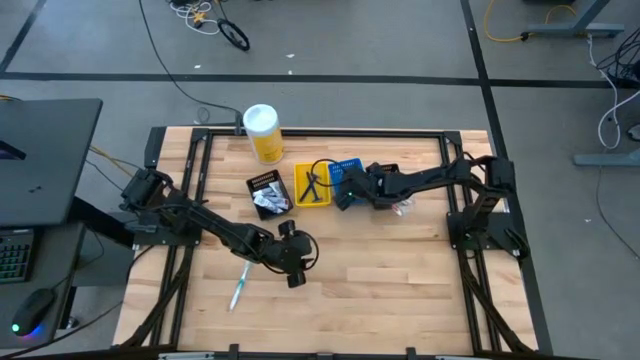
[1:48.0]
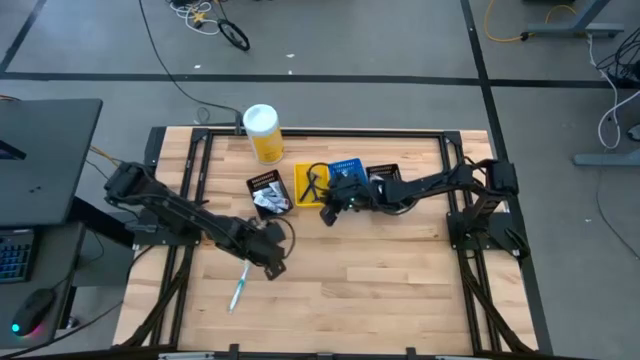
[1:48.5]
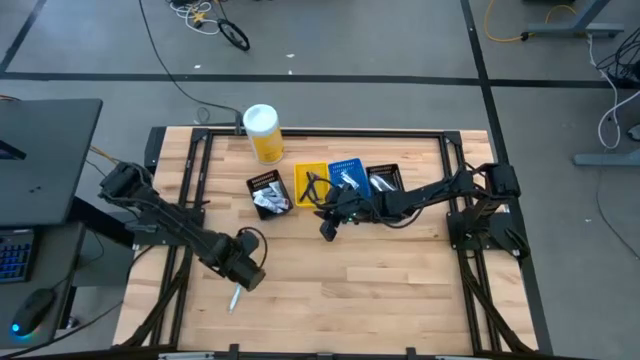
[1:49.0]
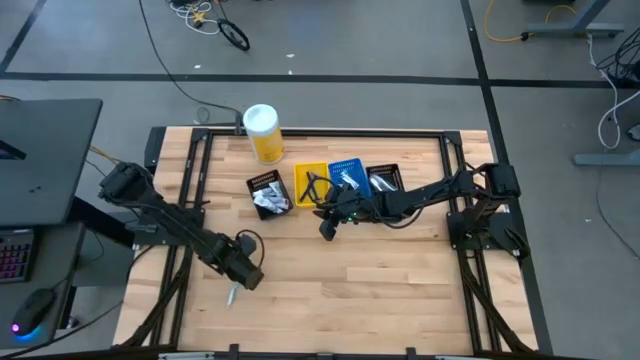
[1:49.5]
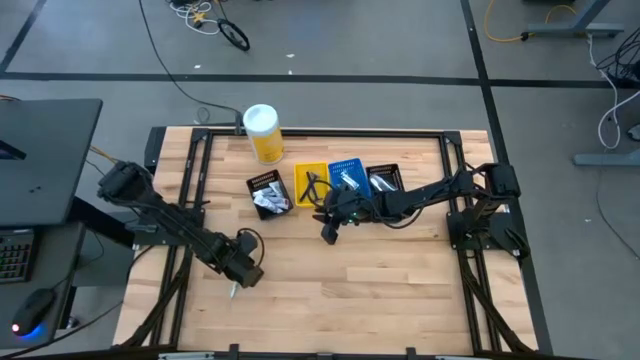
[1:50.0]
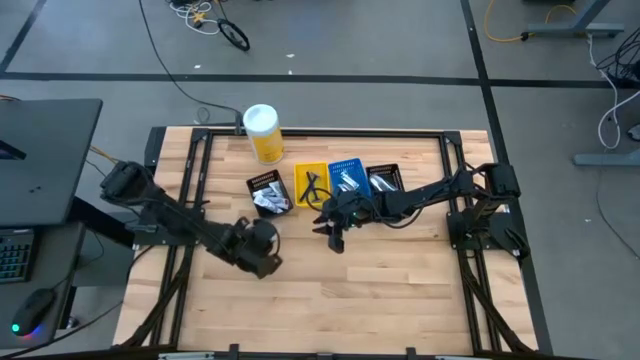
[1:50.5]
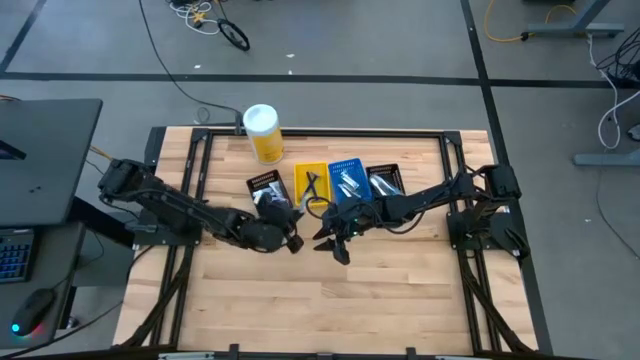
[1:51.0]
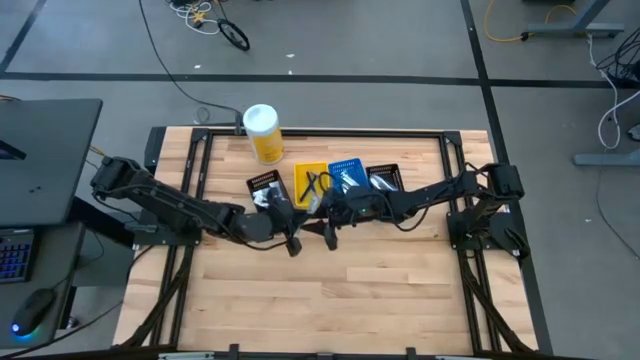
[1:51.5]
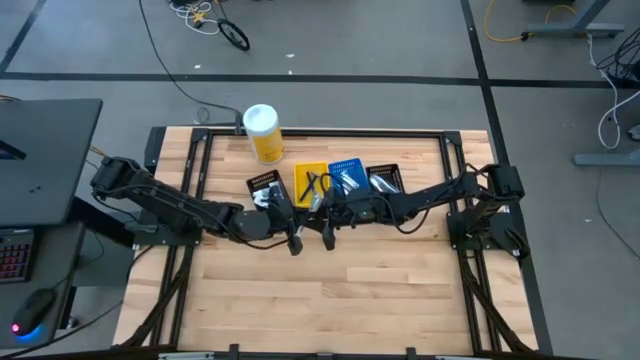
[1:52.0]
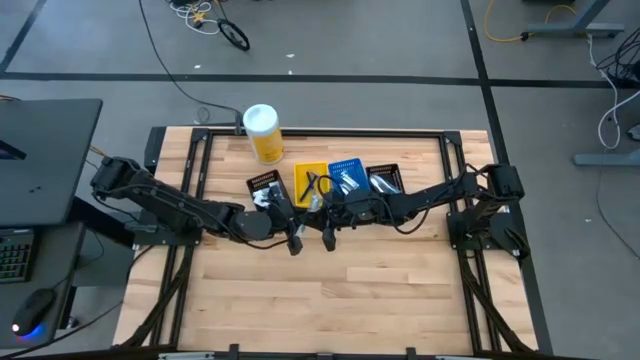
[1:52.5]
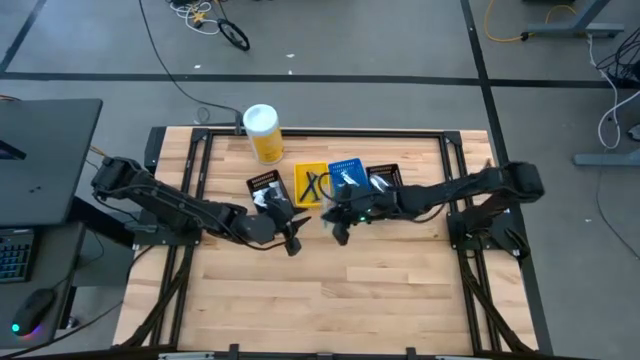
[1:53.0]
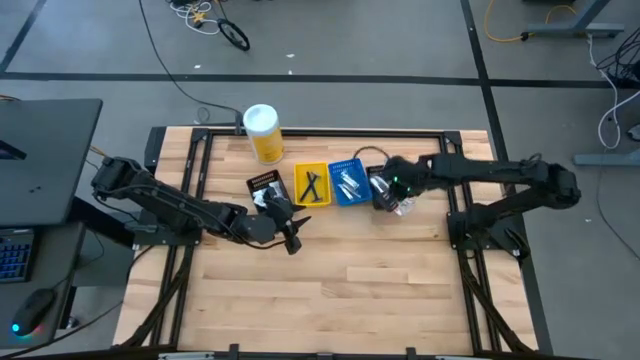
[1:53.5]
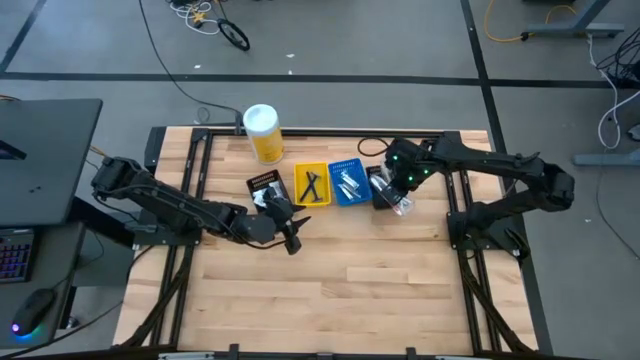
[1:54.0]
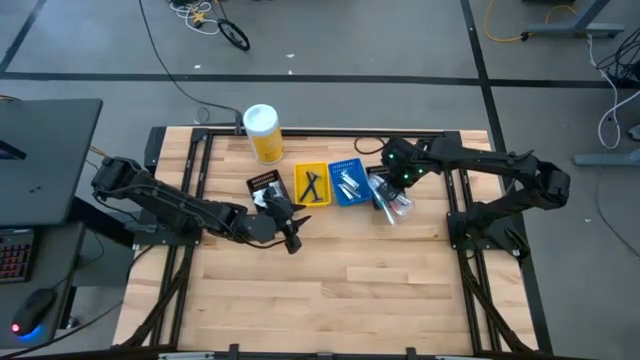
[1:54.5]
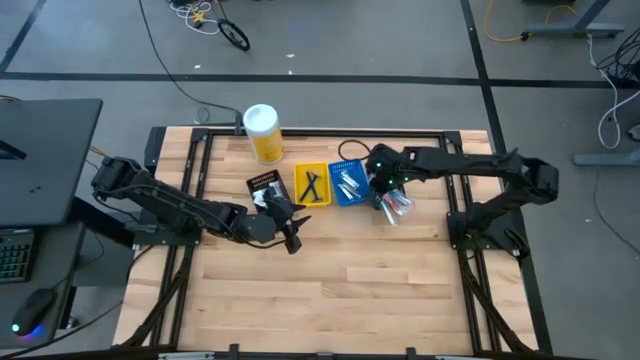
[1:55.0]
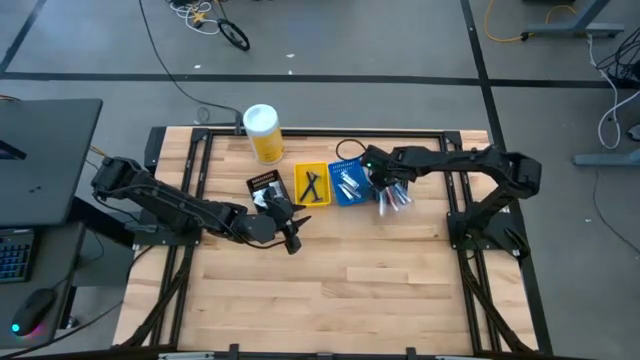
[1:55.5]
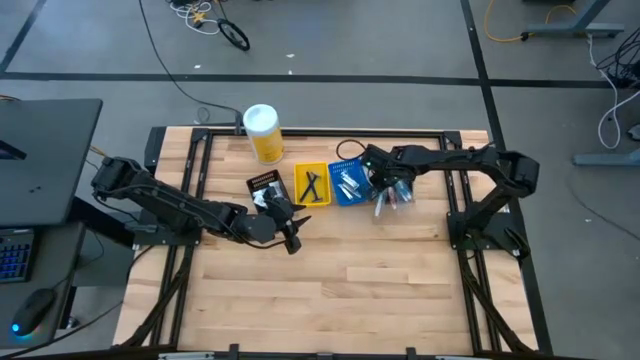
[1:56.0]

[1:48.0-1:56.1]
Task: Pick & Place Travel size toiletries
Put the green toothbrush into the right black basket

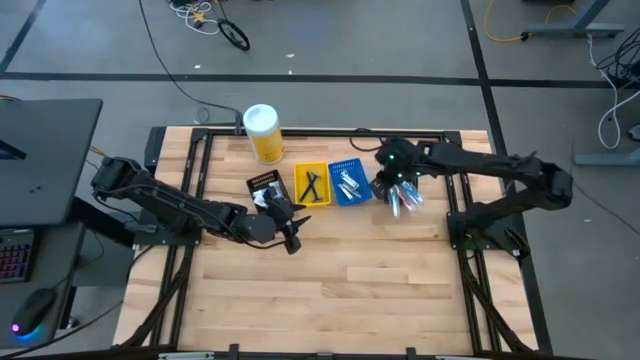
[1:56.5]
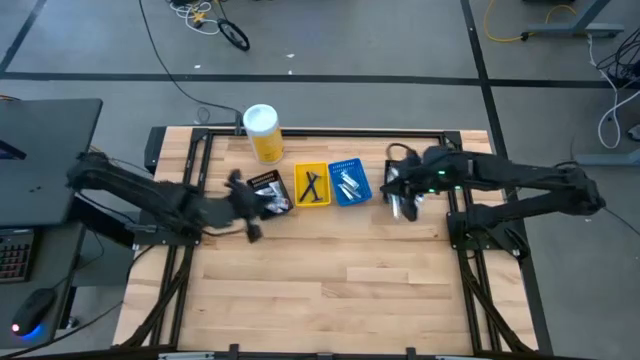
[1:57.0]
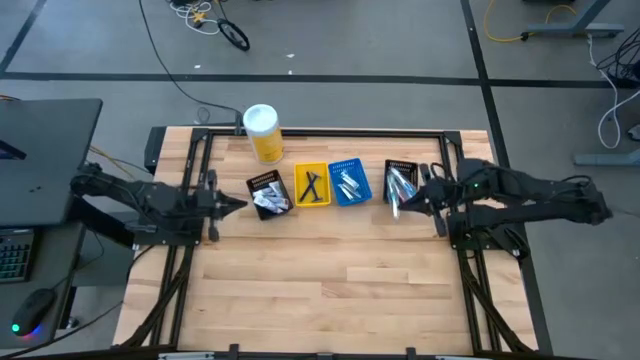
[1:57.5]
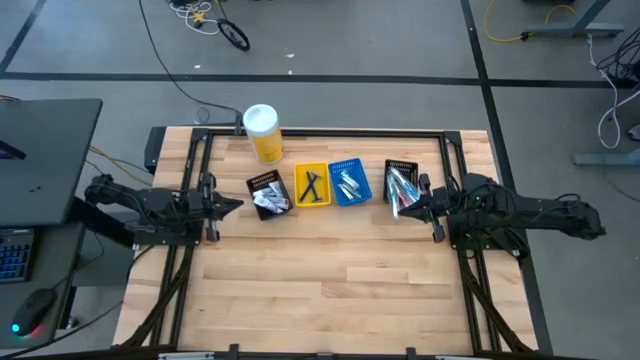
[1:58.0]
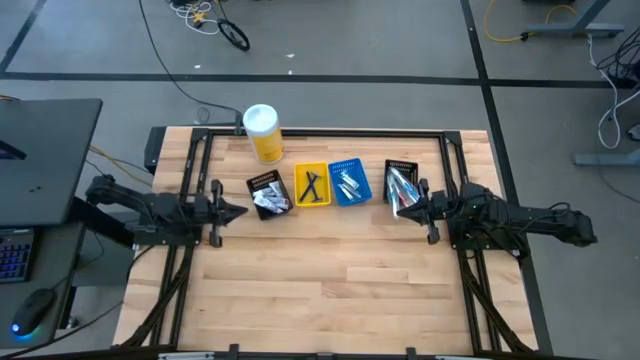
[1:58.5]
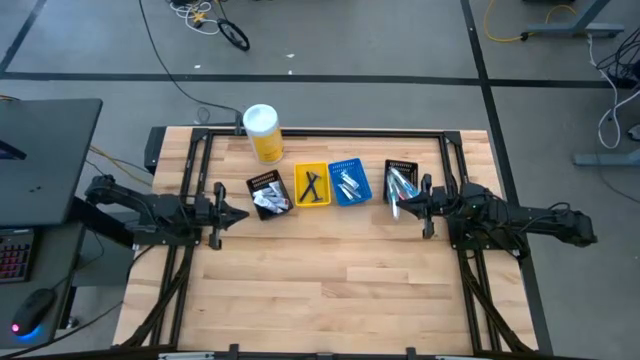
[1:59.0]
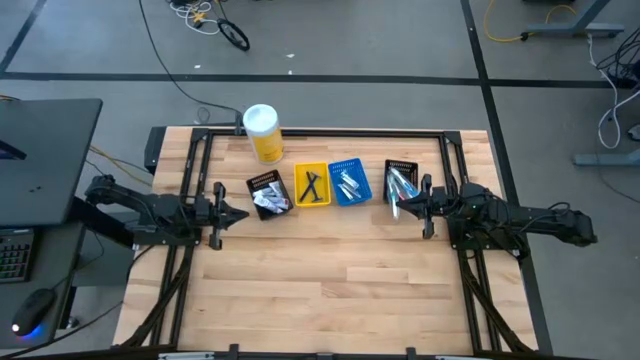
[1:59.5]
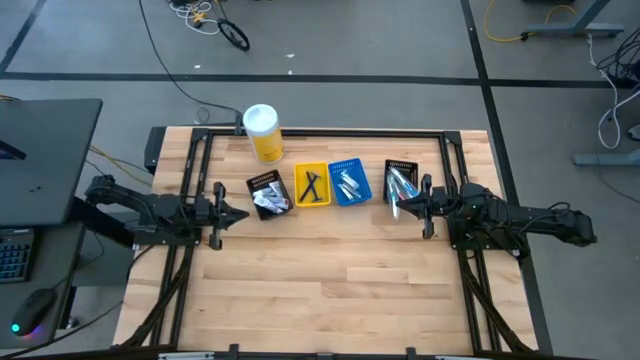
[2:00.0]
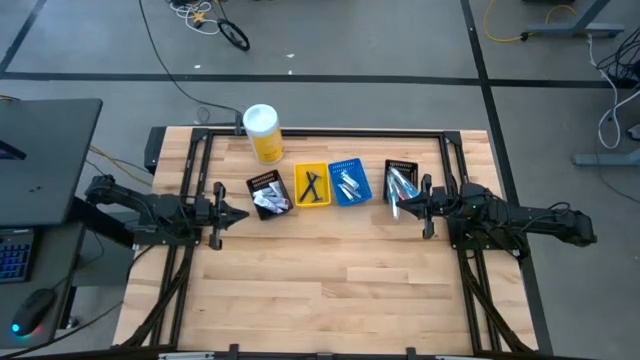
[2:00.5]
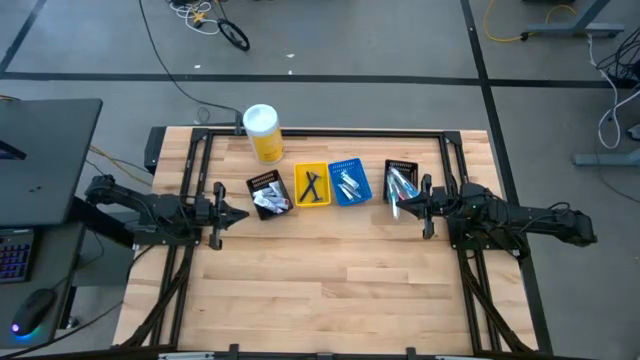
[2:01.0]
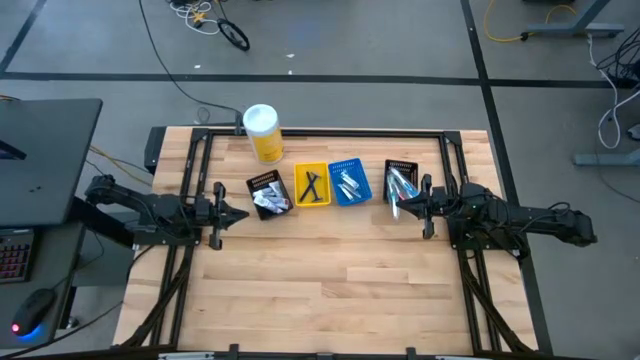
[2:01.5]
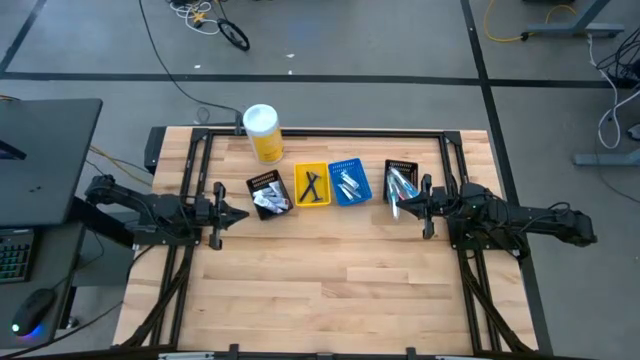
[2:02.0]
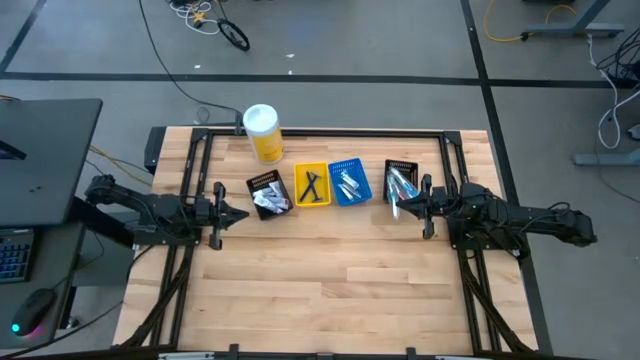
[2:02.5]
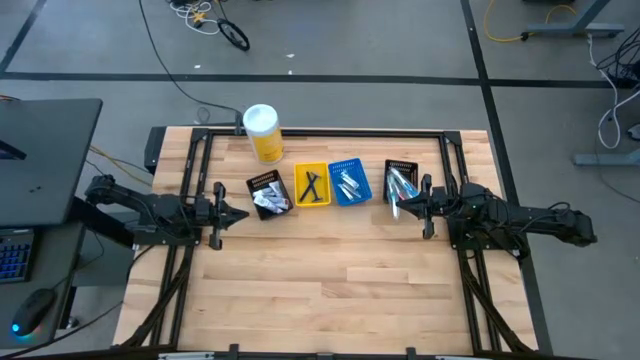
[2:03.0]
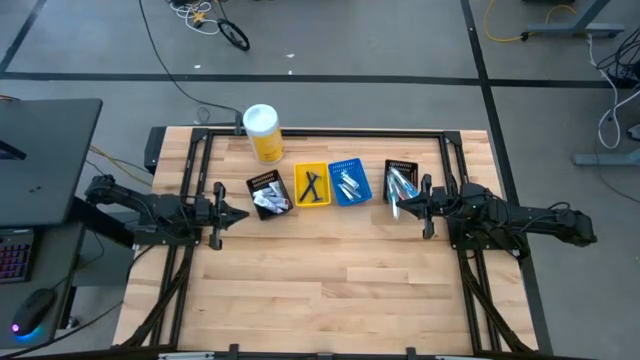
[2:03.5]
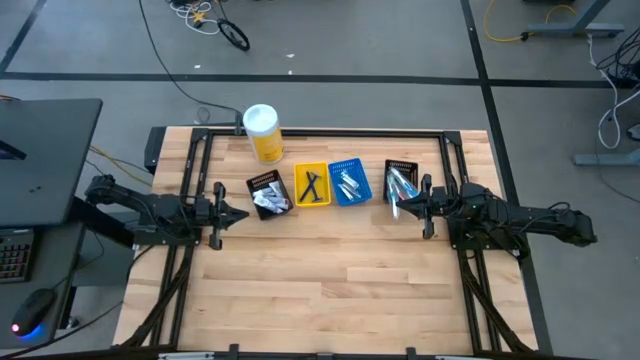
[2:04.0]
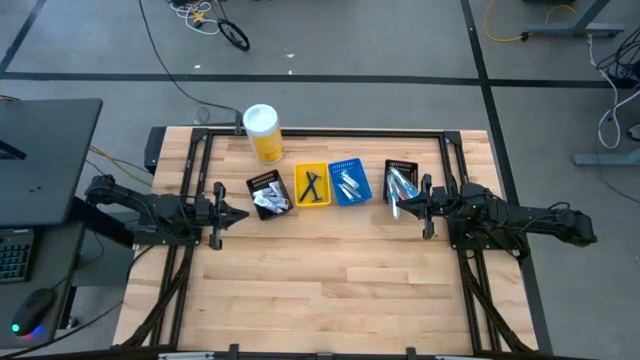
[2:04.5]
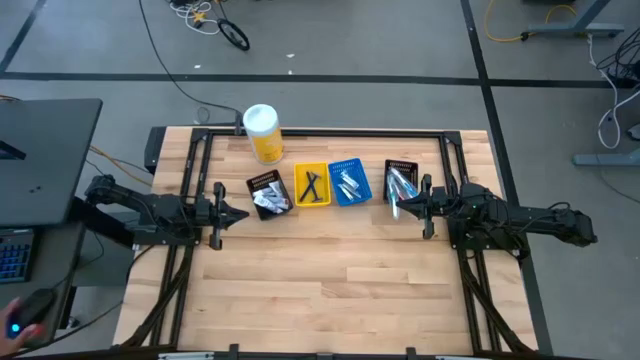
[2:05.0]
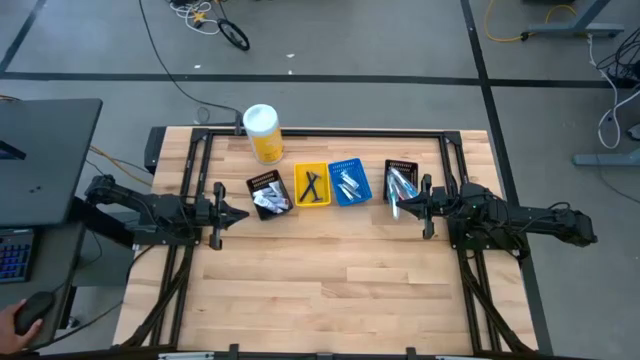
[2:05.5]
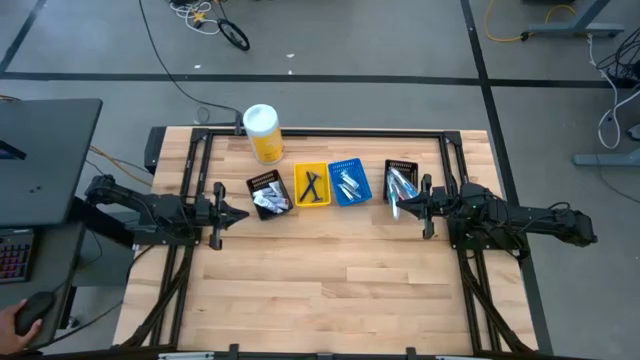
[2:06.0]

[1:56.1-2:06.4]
Return to Home Position

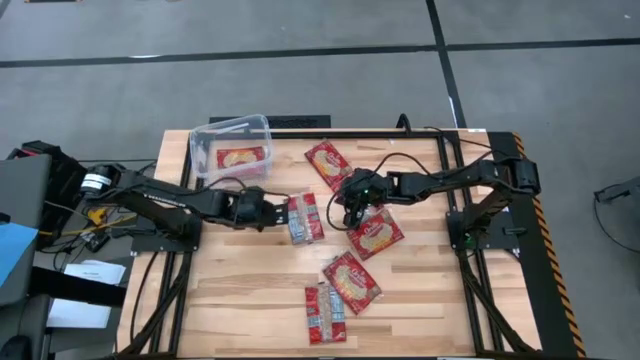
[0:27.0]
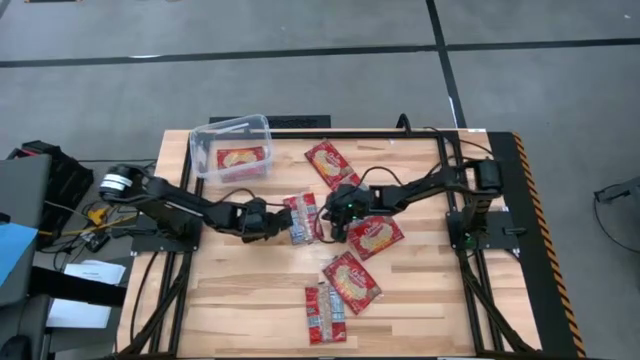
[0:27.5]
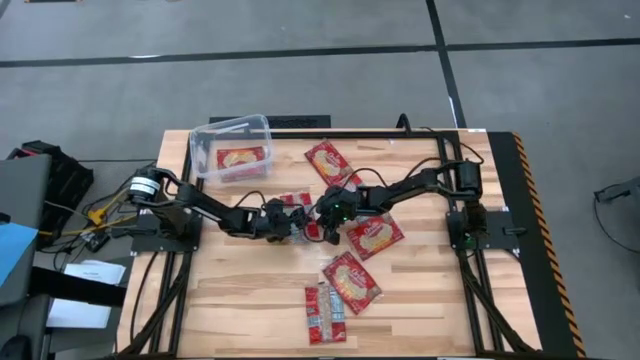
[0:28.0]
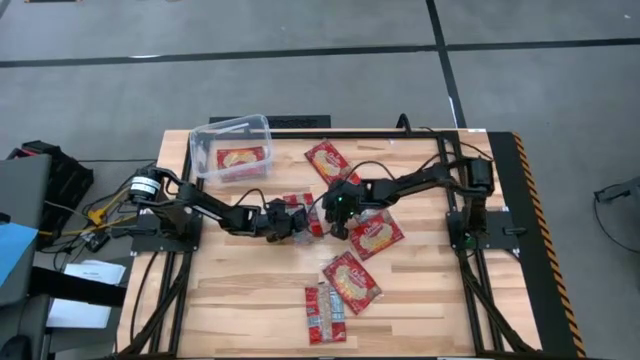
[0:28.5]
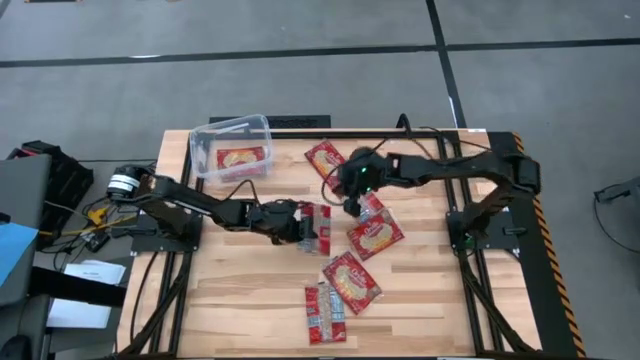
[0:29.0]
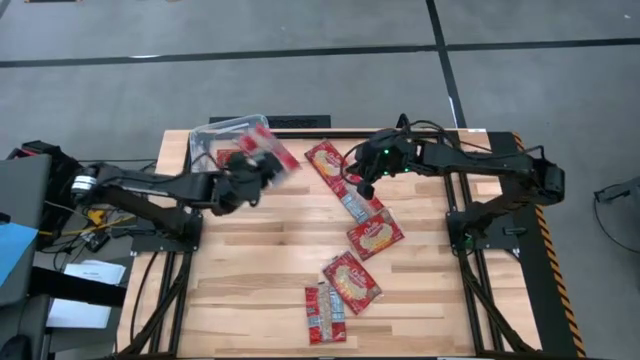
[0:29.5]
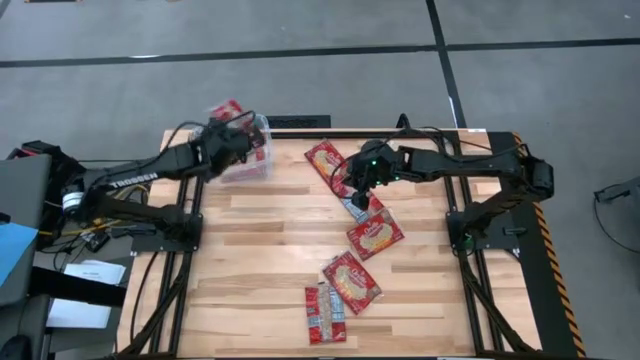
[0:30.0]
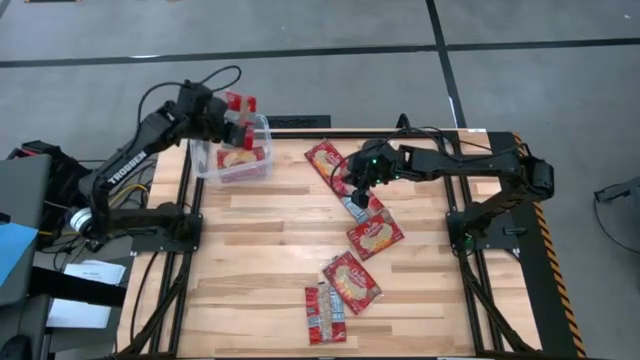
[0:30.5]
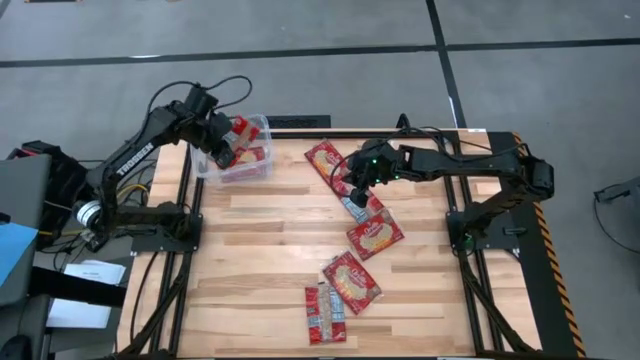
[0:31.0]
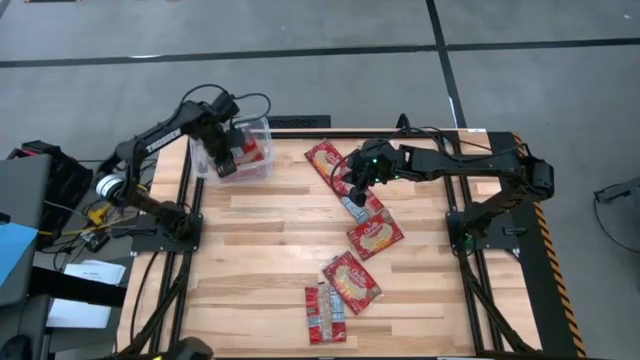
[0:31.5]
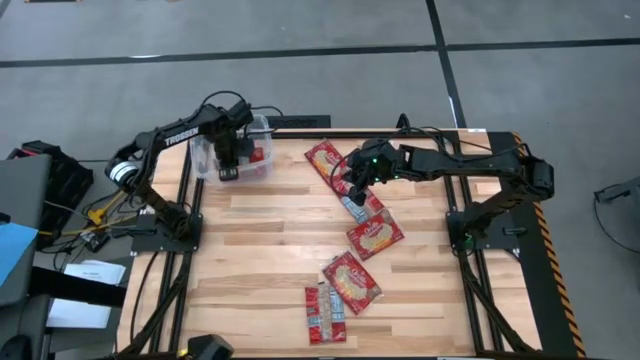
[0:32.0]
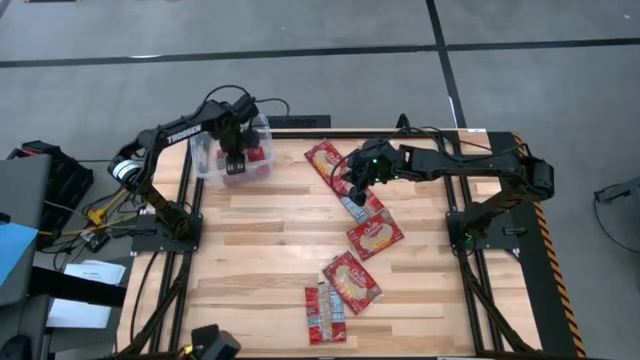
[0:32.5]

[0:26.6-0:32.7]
Task: Sort popcorn bags into baskets
Put the red popcorn bag into the transparent bin
